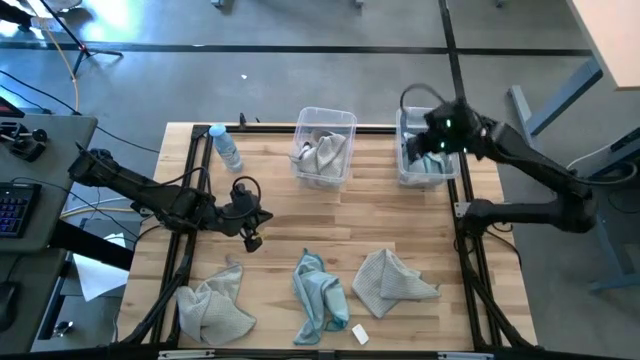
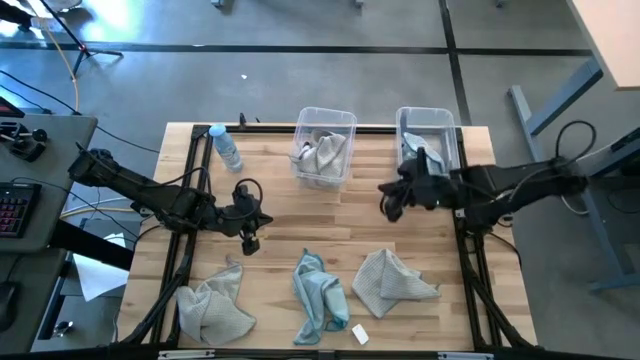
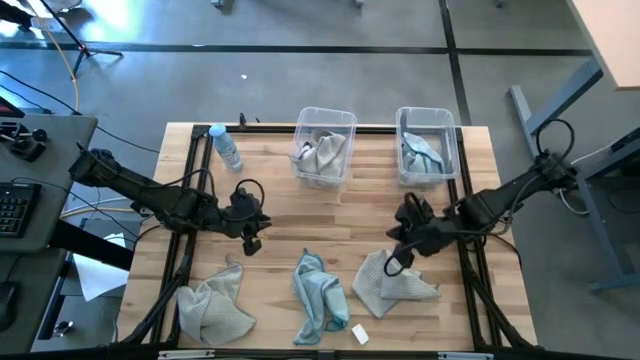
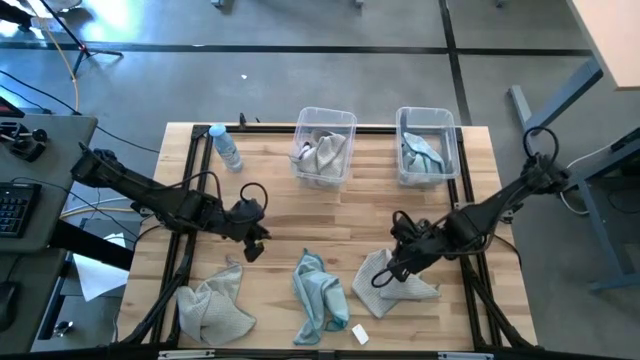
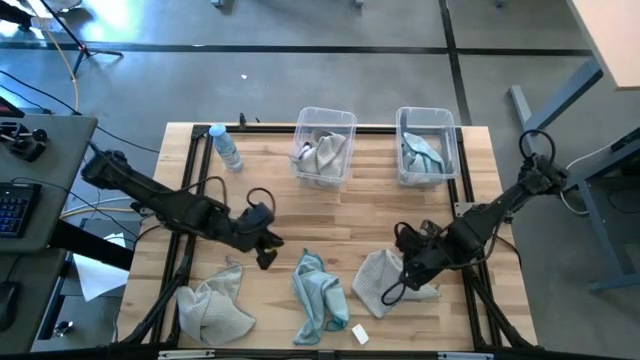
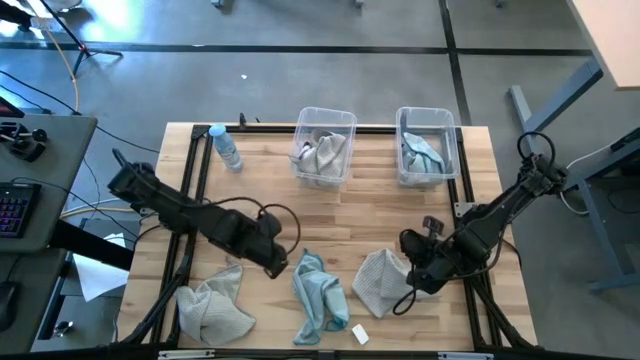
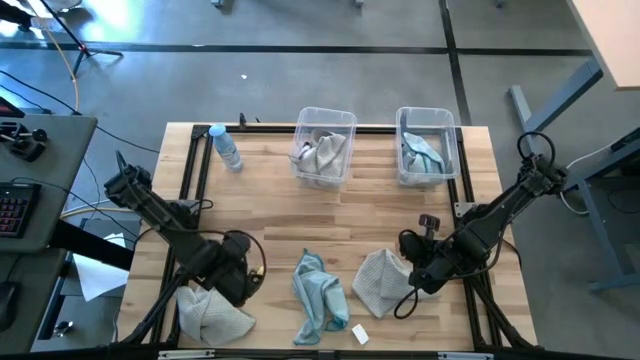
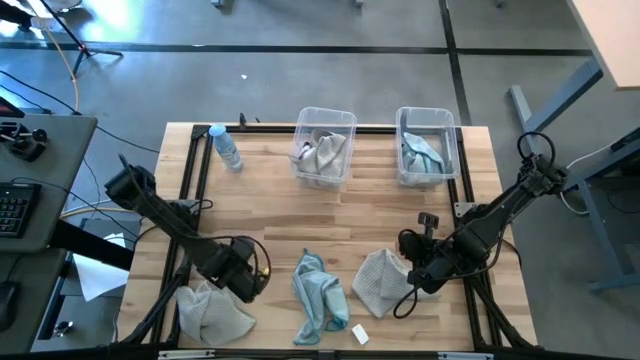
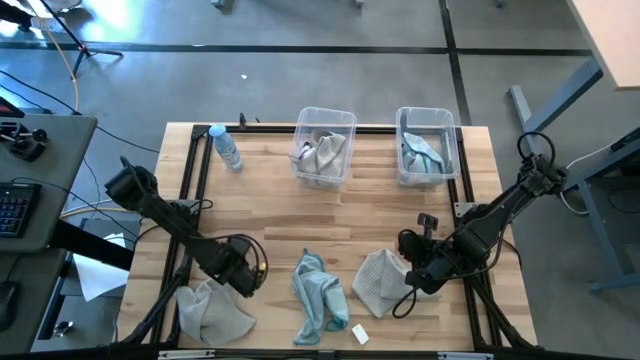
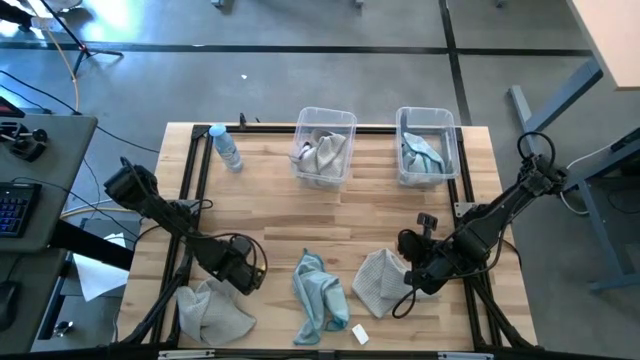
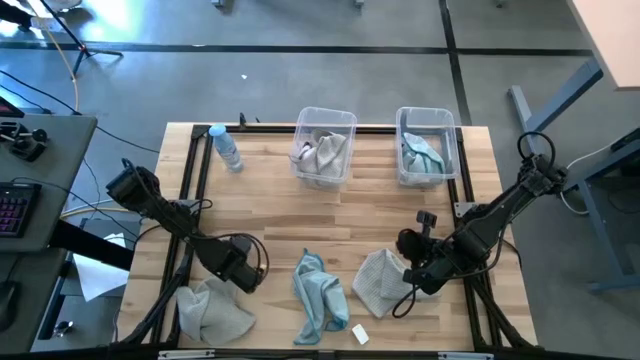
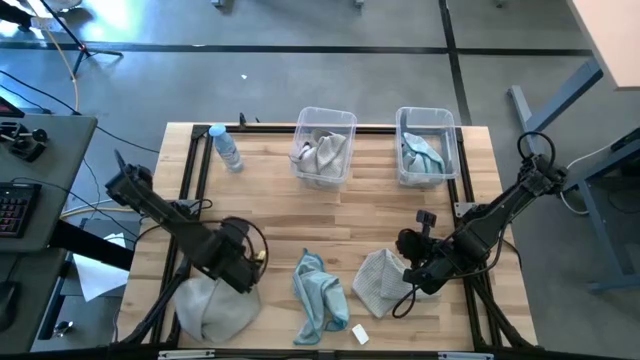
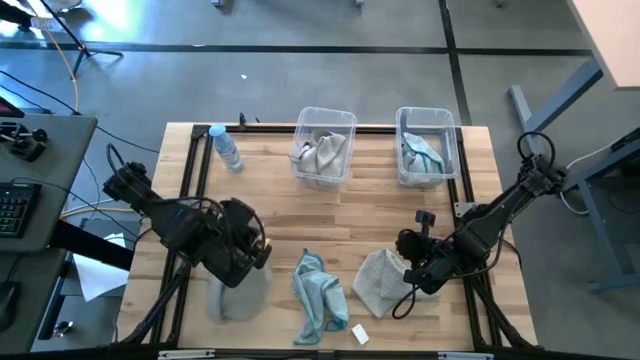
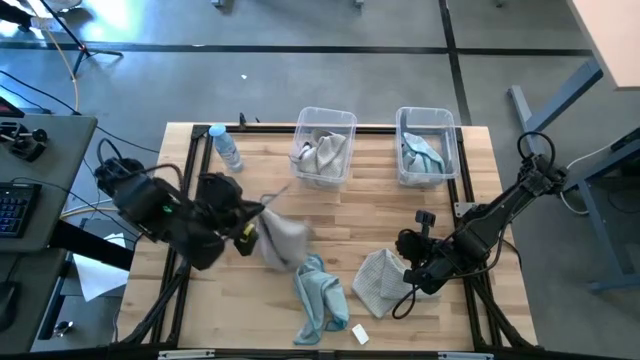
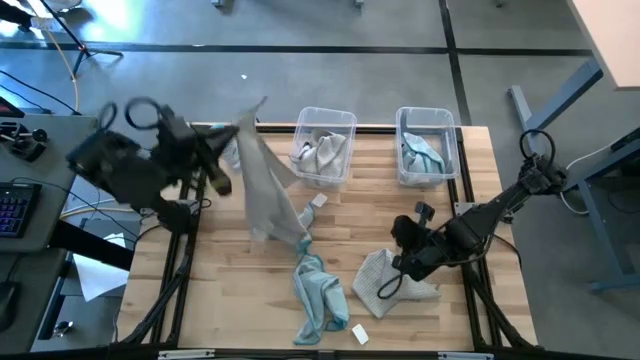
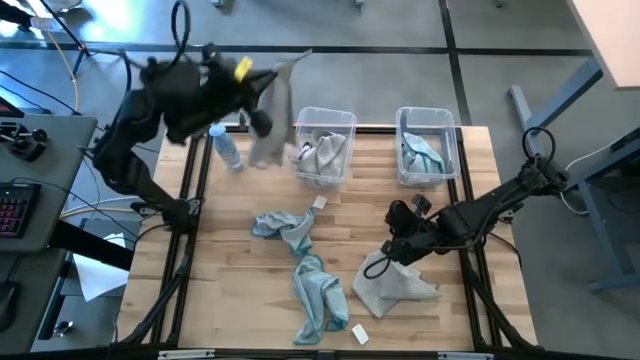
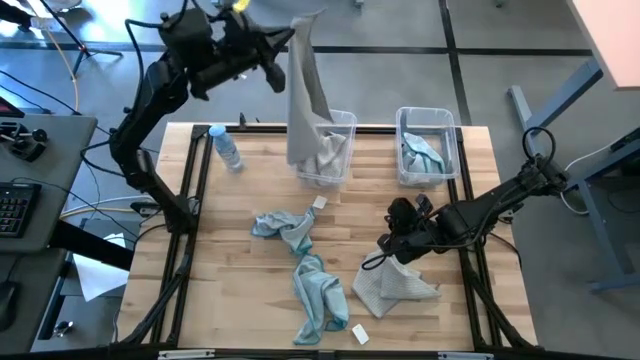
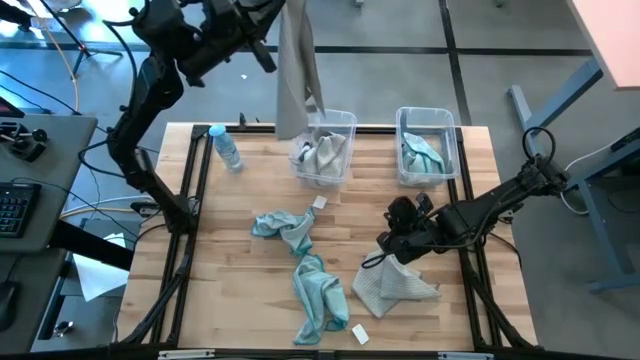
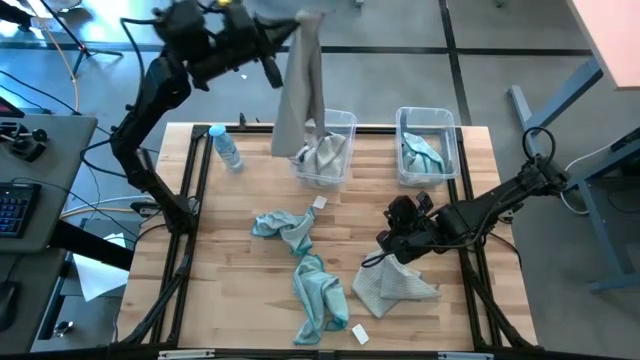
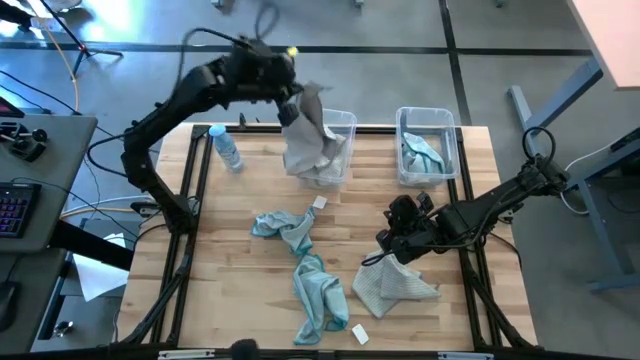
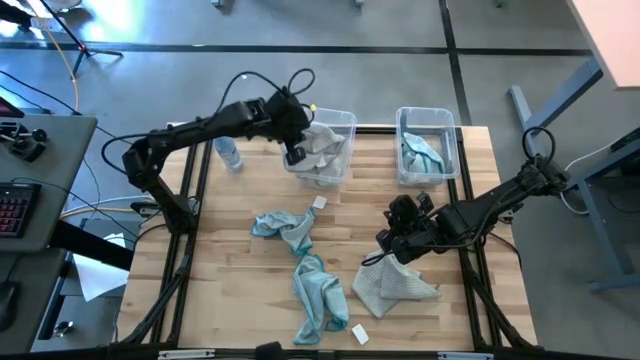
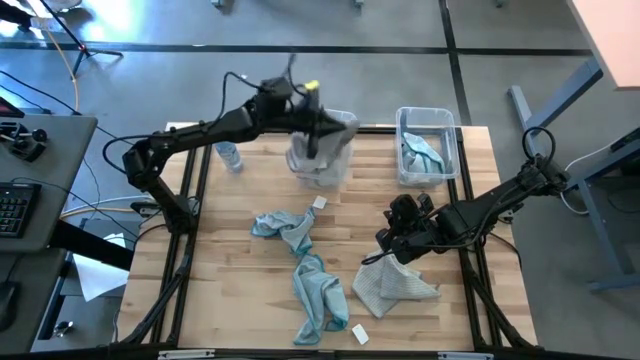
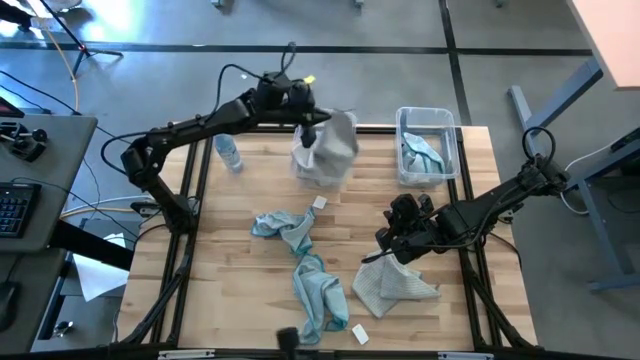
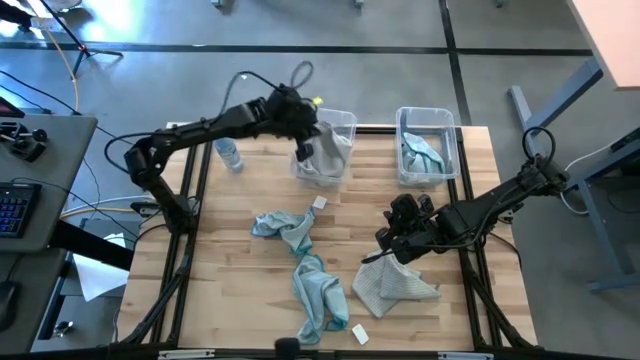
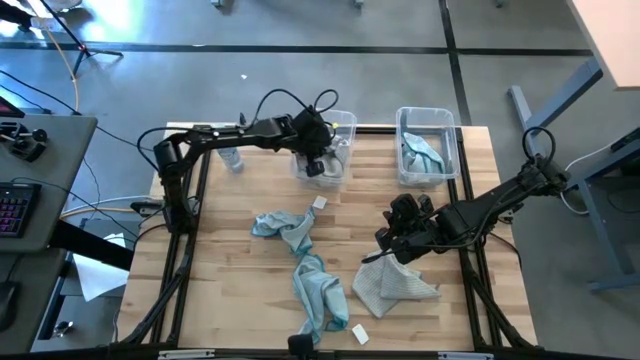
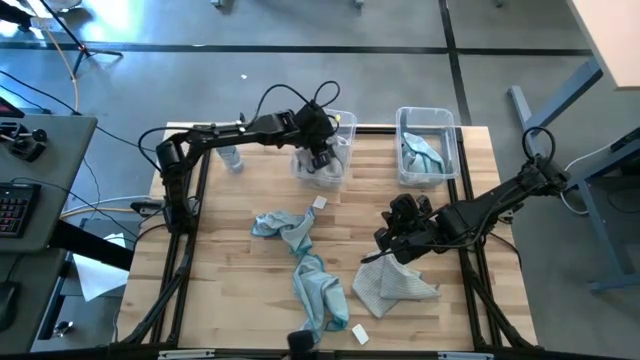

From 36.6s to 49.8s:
Task: Sort microfiber towel by color & place in baskets
Put the white microfiber cloth into the left transparent bin

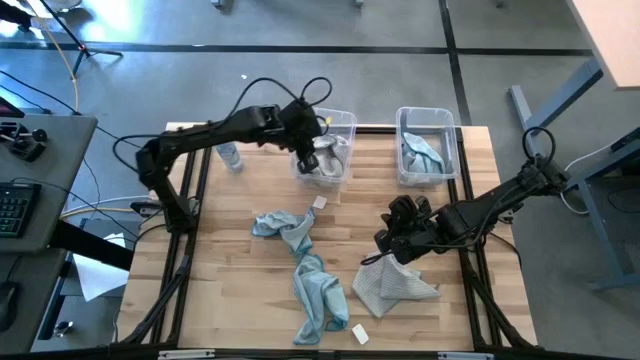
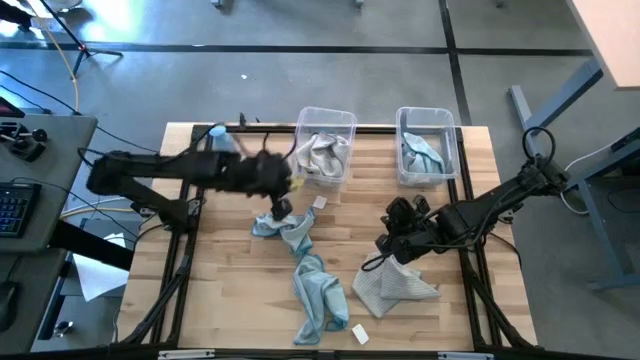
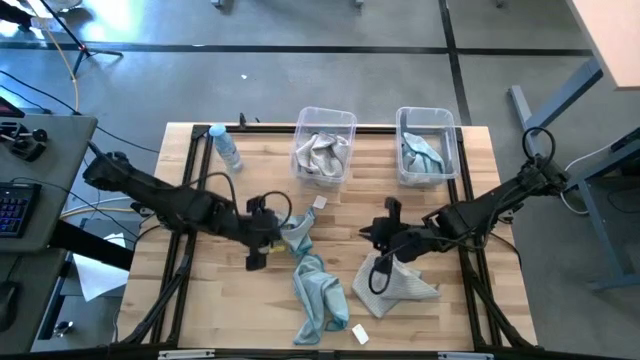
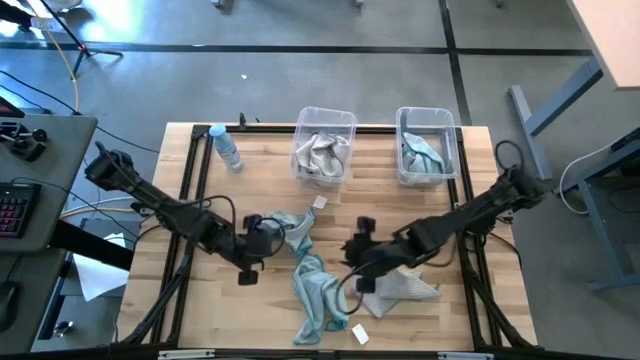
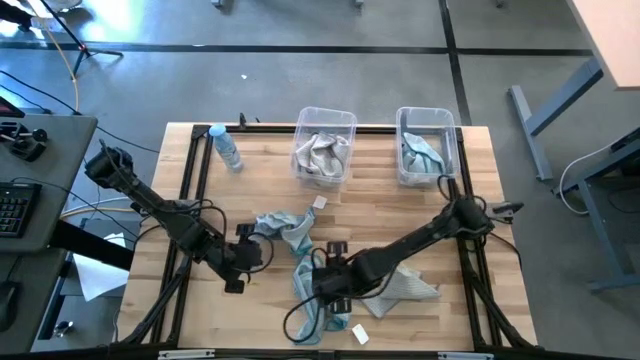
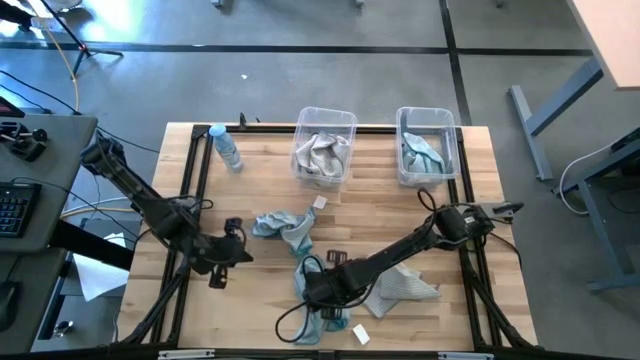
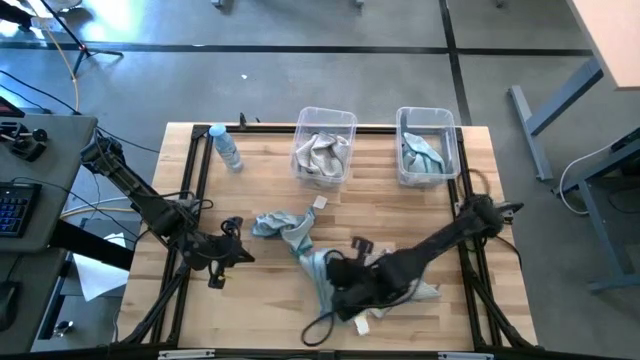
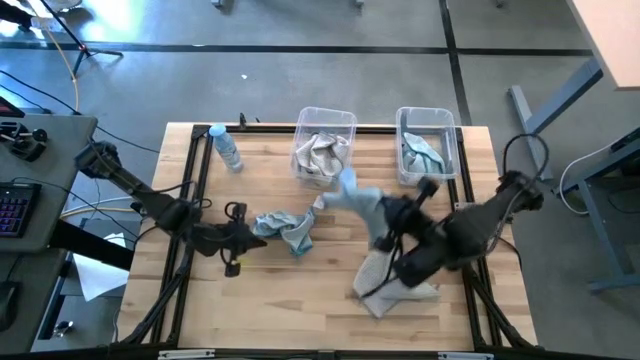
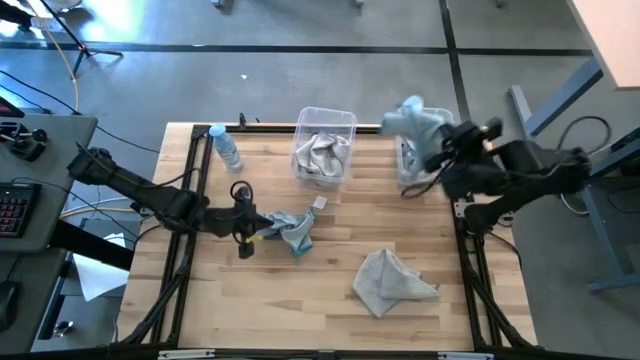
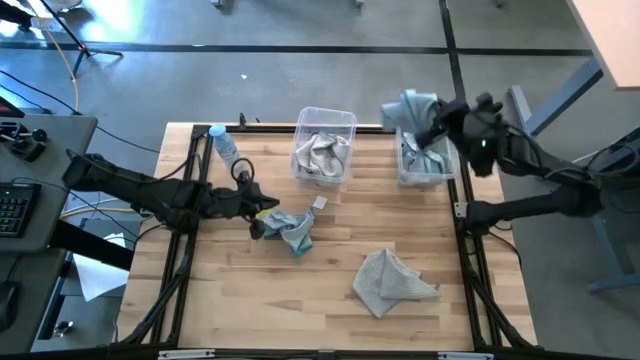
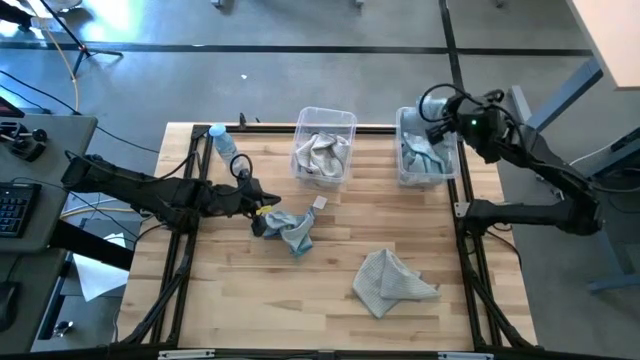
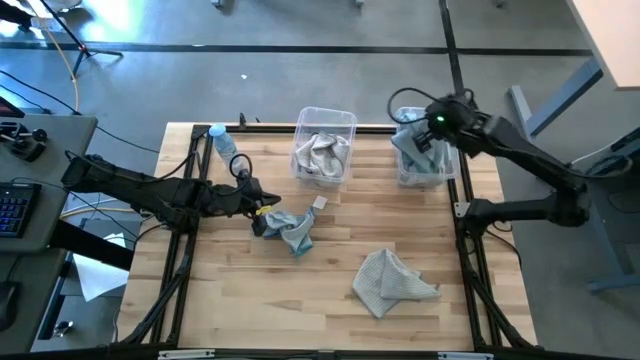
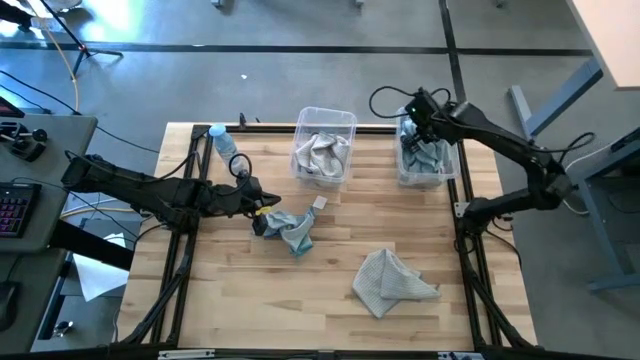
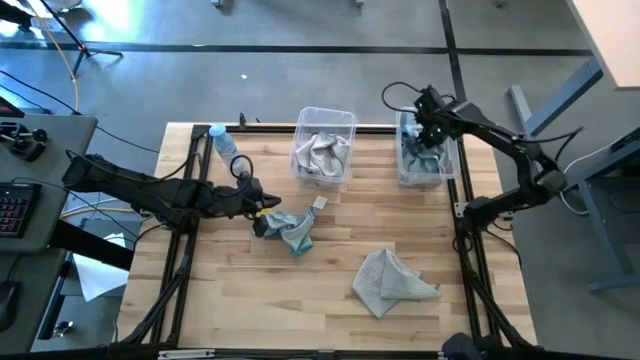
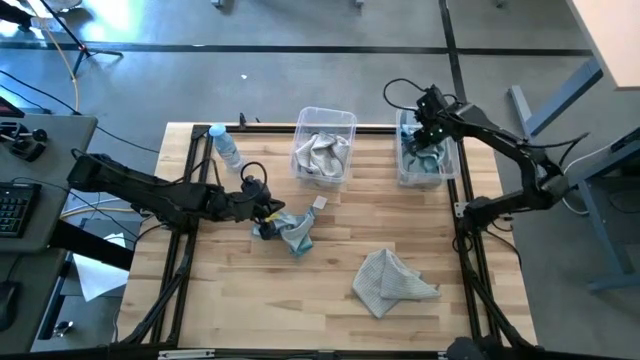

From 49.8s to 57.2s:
Put the light blue microfiber cloth into the right transparent bin

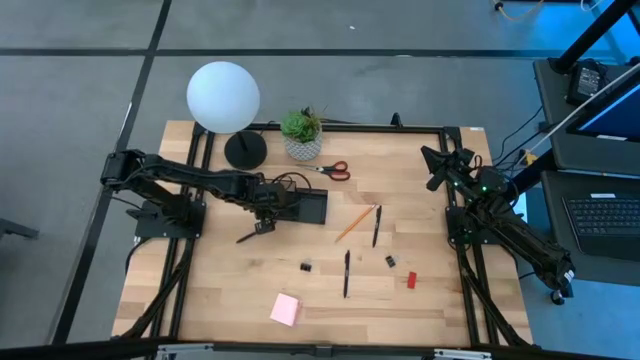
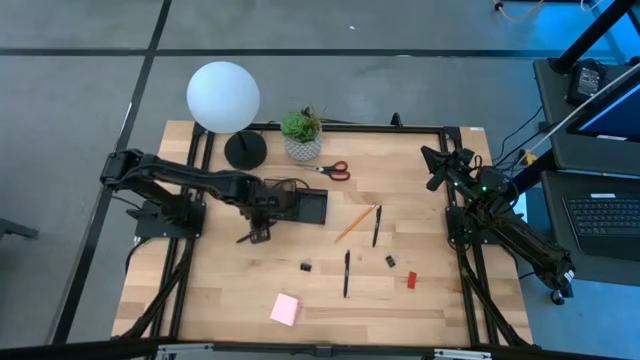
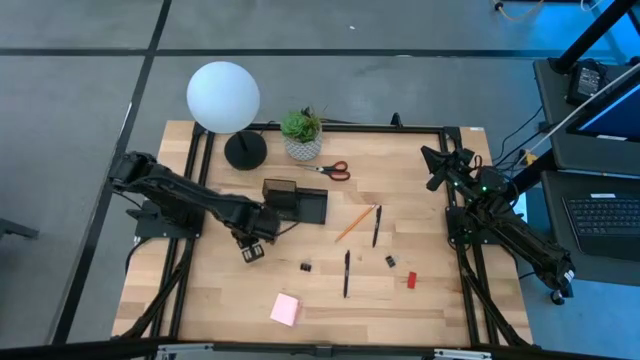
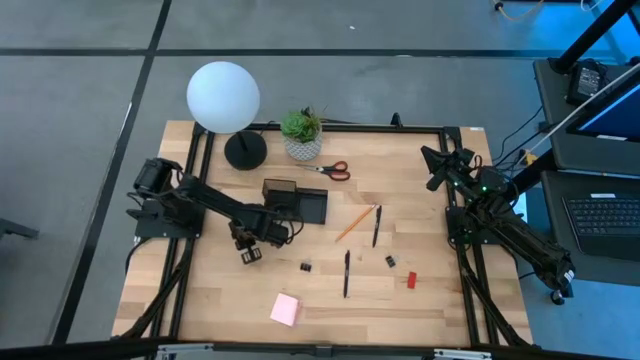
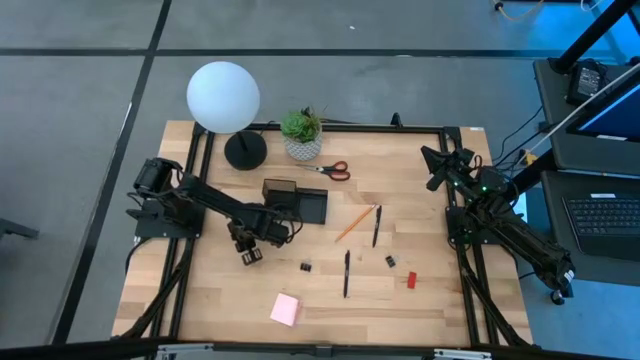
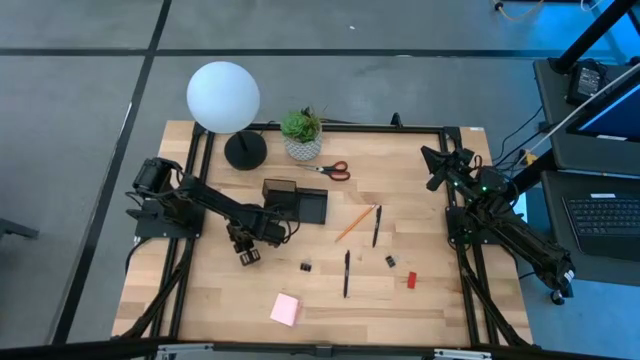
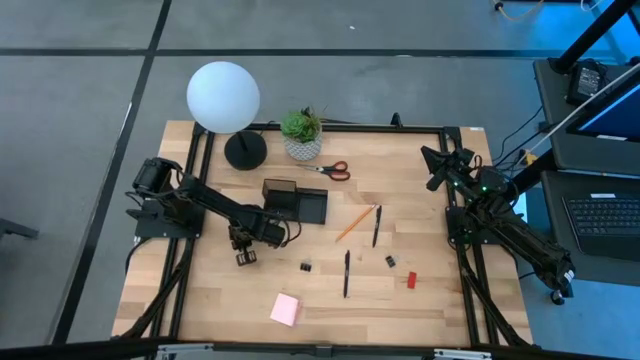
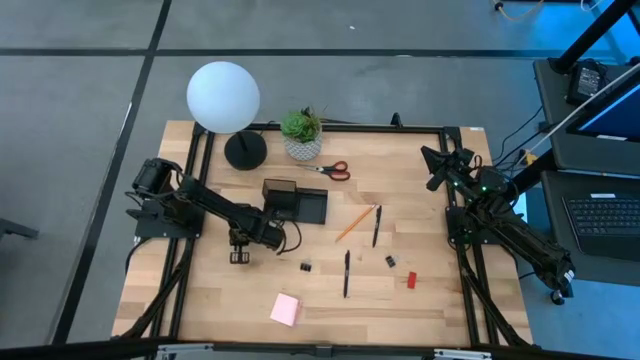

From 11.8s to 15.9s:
Task: Pick and place office supplies into organizer
Put the black pen into the black desk organizer
